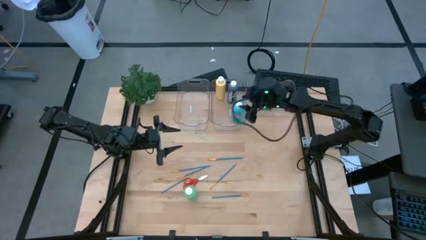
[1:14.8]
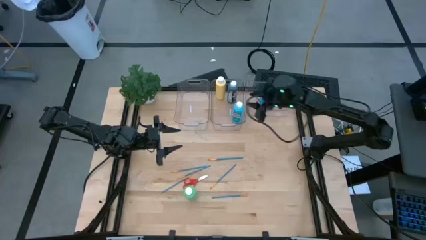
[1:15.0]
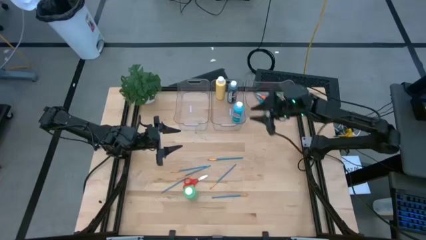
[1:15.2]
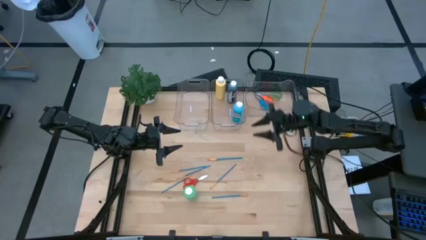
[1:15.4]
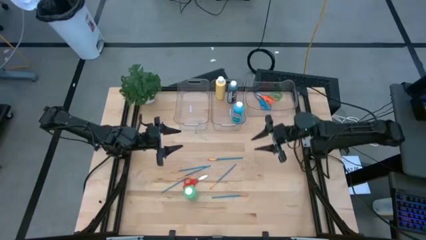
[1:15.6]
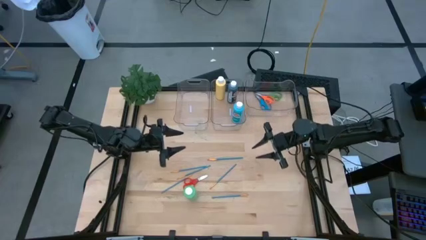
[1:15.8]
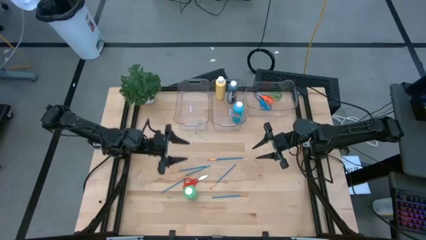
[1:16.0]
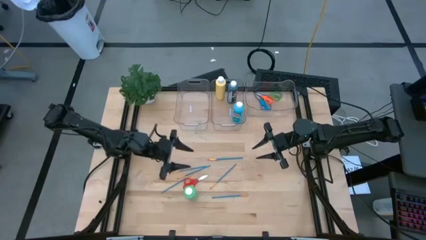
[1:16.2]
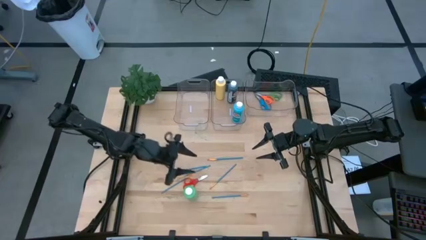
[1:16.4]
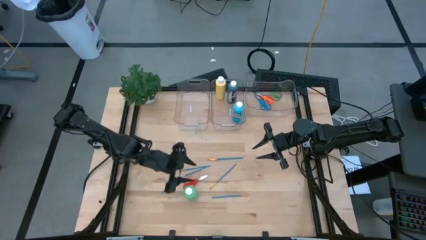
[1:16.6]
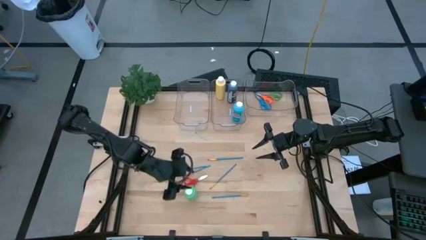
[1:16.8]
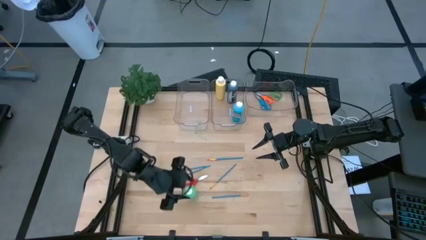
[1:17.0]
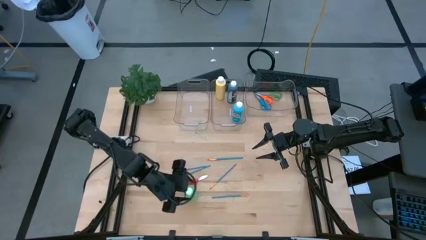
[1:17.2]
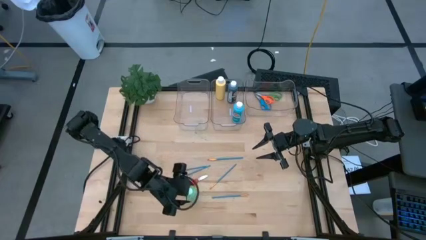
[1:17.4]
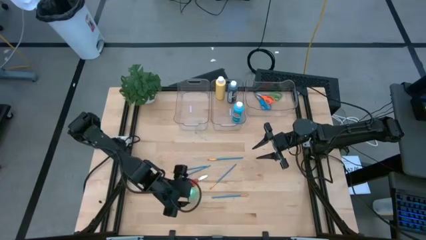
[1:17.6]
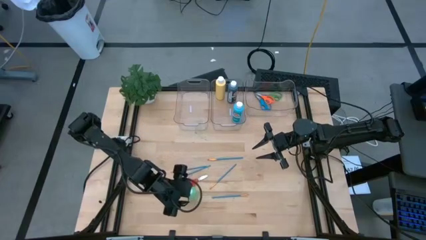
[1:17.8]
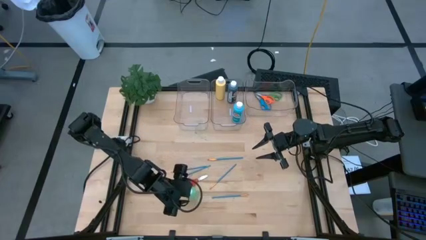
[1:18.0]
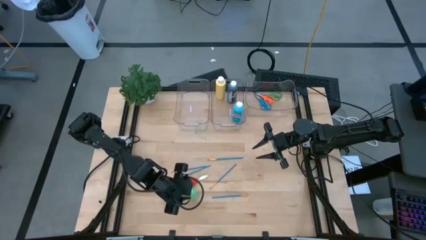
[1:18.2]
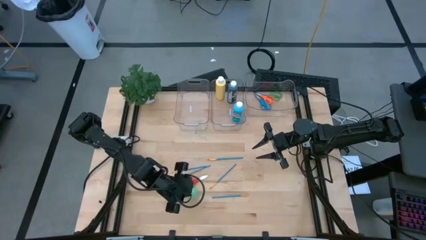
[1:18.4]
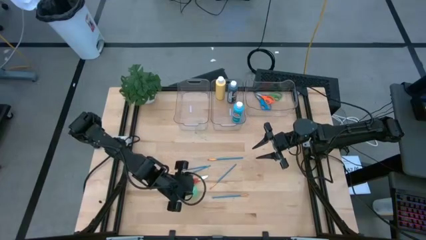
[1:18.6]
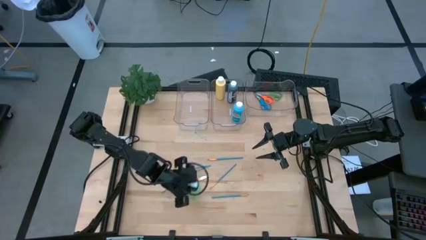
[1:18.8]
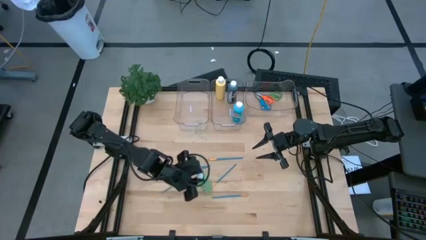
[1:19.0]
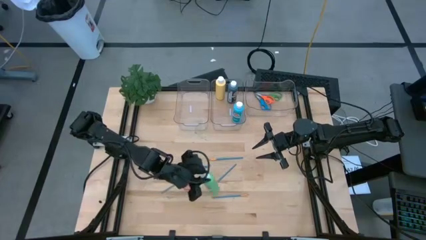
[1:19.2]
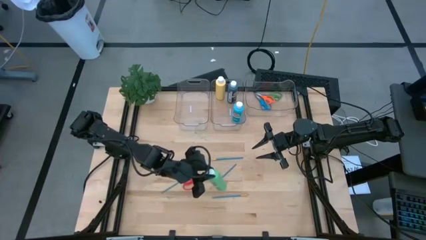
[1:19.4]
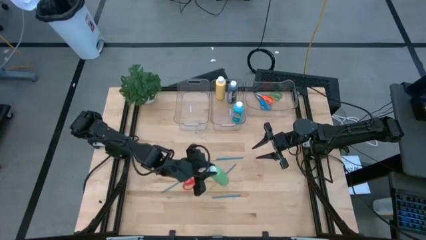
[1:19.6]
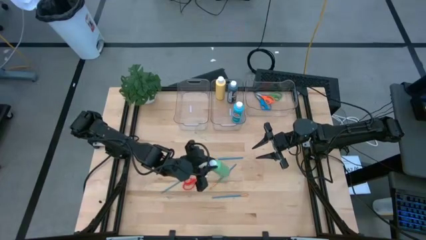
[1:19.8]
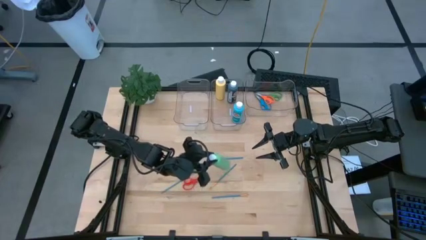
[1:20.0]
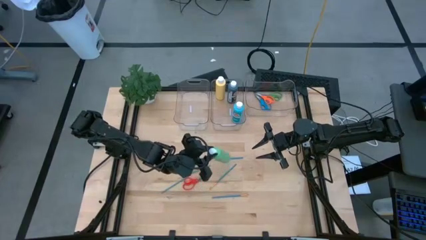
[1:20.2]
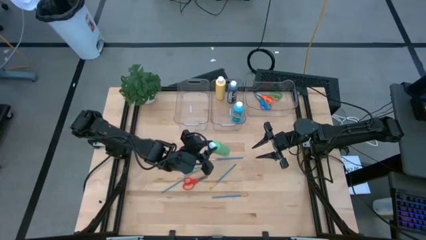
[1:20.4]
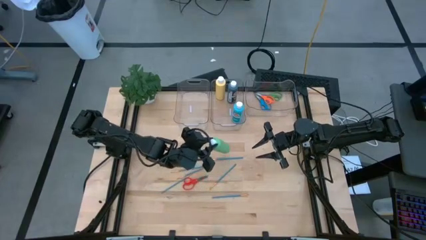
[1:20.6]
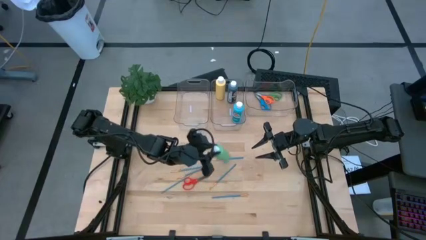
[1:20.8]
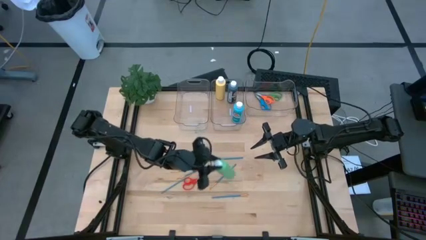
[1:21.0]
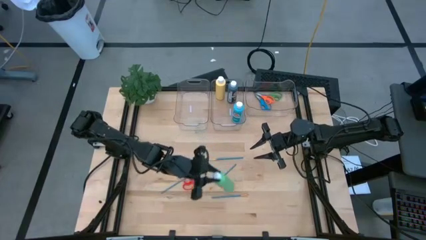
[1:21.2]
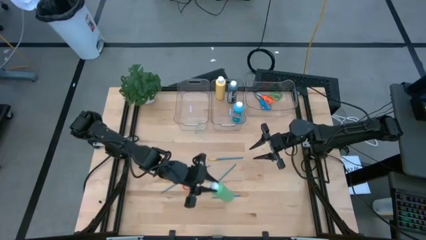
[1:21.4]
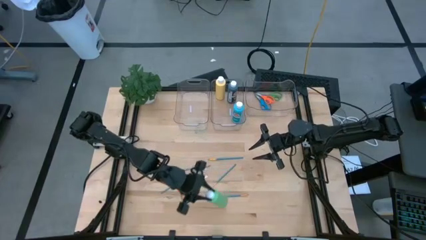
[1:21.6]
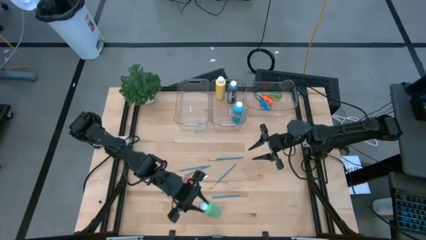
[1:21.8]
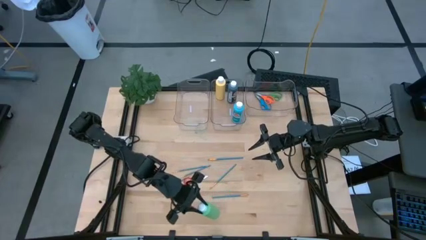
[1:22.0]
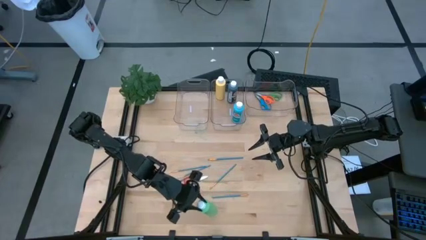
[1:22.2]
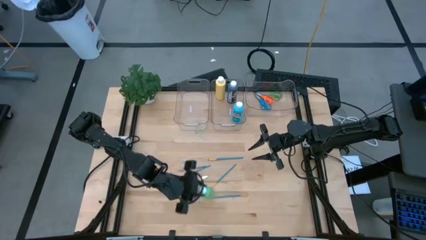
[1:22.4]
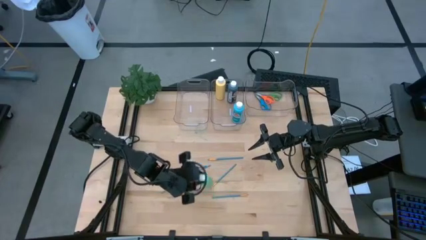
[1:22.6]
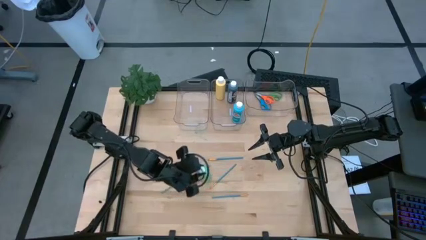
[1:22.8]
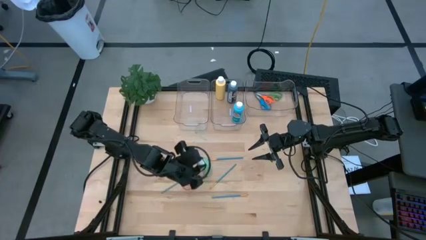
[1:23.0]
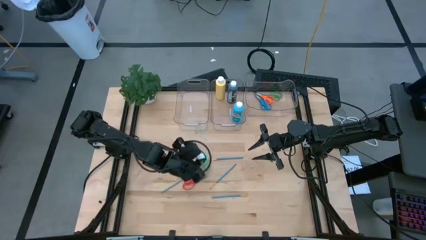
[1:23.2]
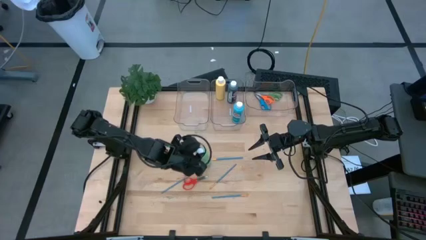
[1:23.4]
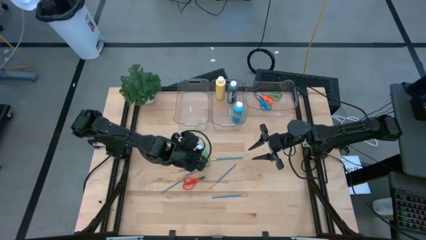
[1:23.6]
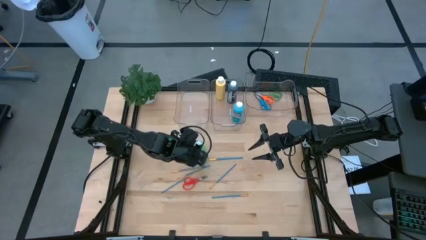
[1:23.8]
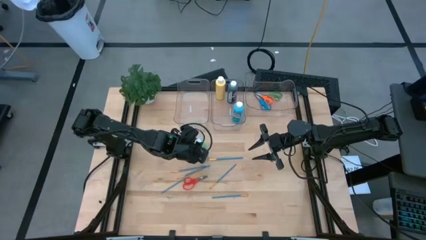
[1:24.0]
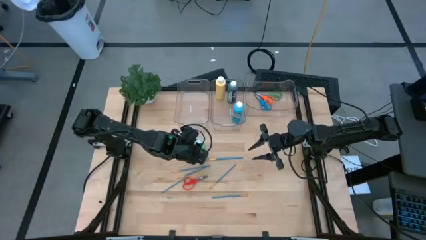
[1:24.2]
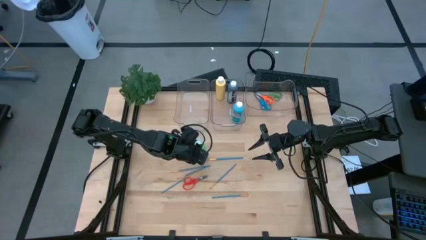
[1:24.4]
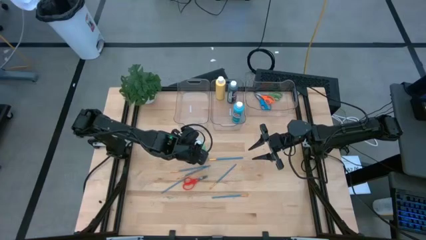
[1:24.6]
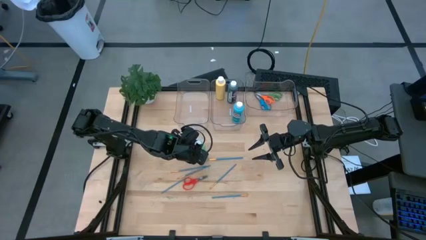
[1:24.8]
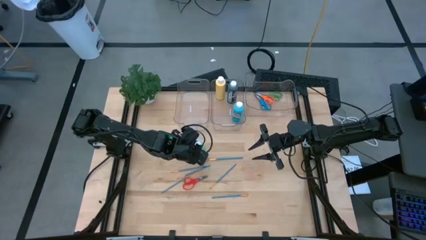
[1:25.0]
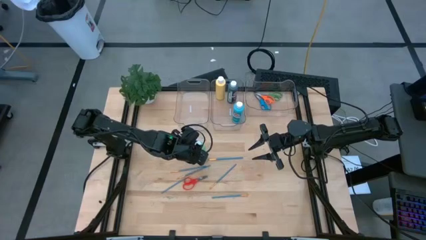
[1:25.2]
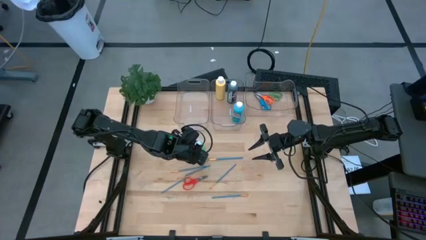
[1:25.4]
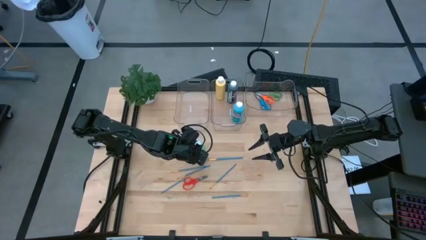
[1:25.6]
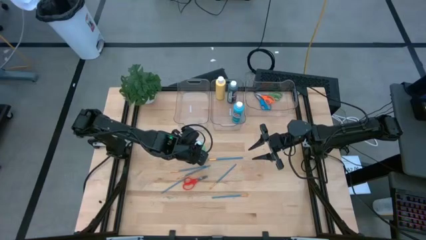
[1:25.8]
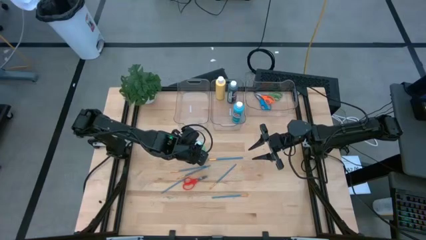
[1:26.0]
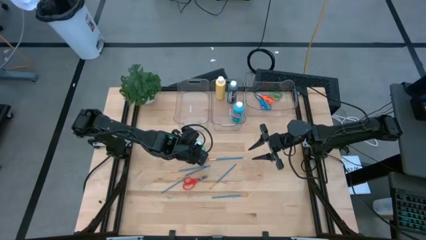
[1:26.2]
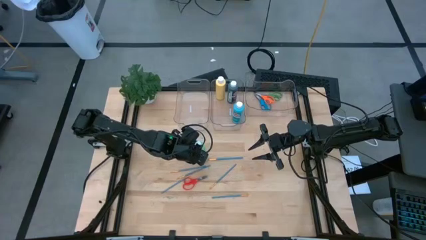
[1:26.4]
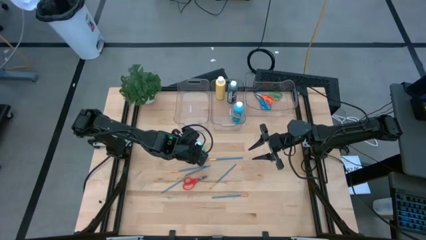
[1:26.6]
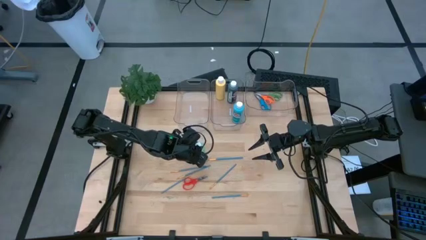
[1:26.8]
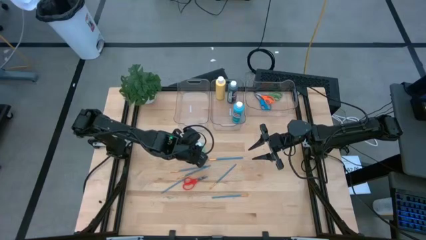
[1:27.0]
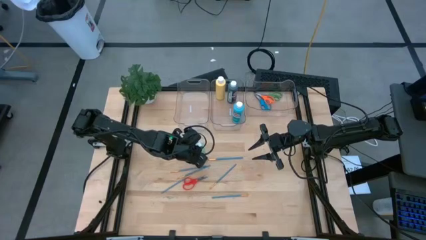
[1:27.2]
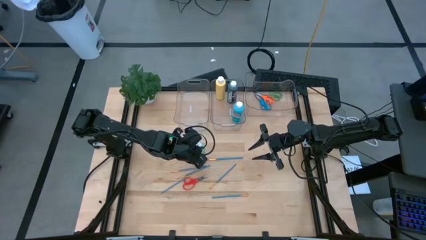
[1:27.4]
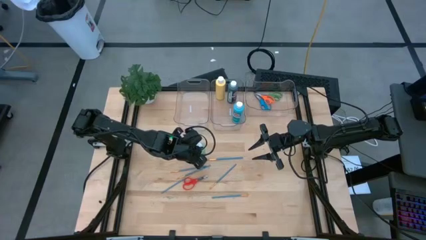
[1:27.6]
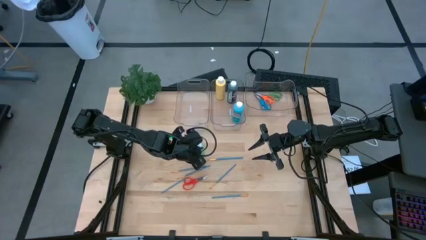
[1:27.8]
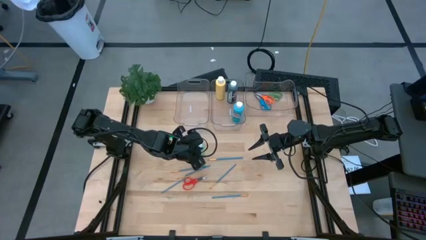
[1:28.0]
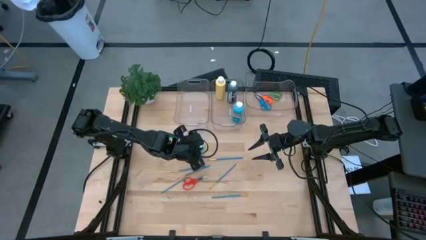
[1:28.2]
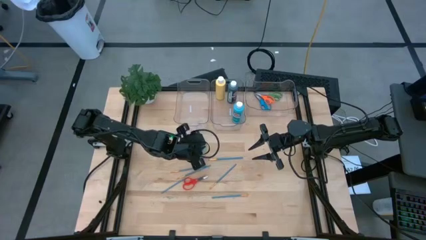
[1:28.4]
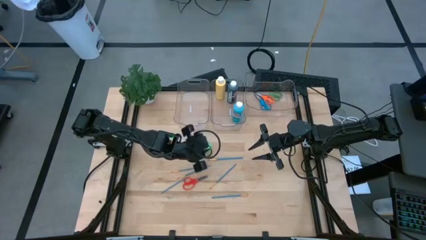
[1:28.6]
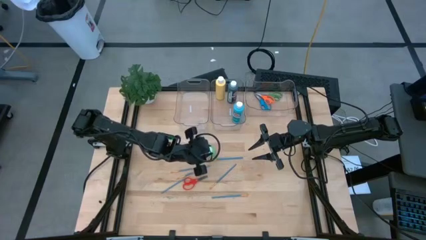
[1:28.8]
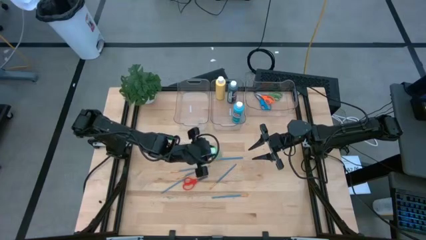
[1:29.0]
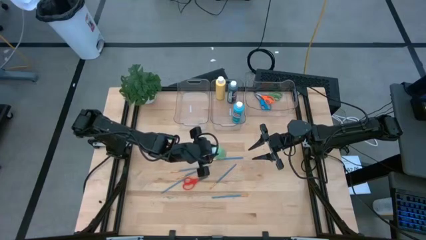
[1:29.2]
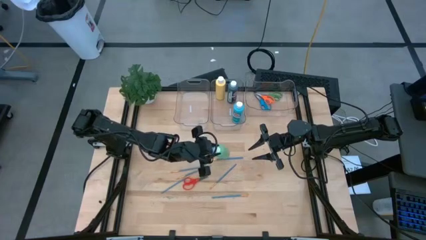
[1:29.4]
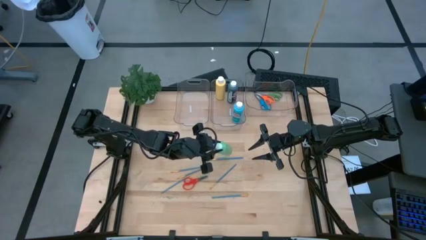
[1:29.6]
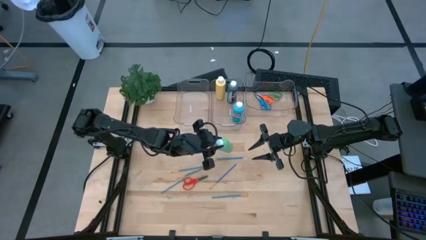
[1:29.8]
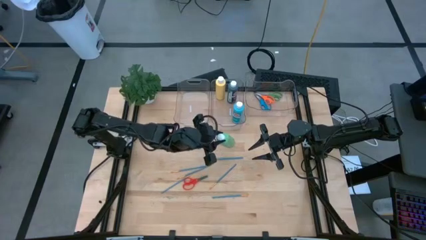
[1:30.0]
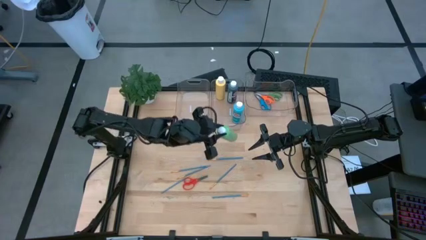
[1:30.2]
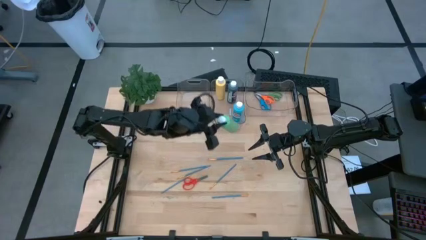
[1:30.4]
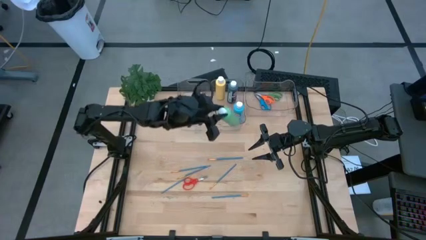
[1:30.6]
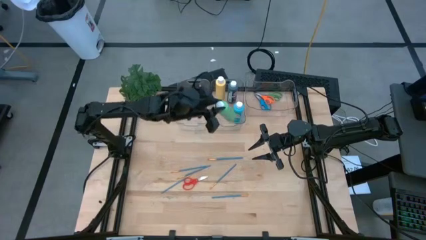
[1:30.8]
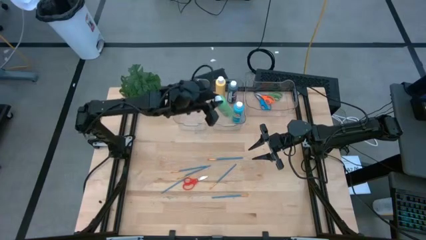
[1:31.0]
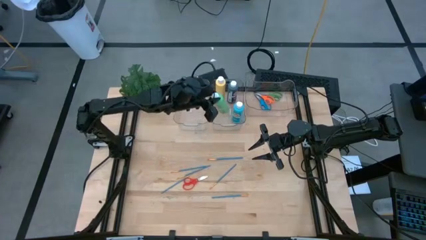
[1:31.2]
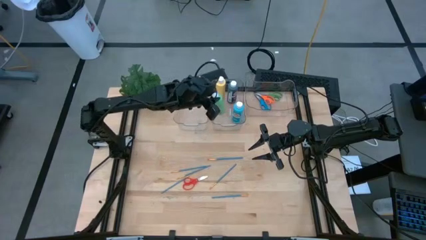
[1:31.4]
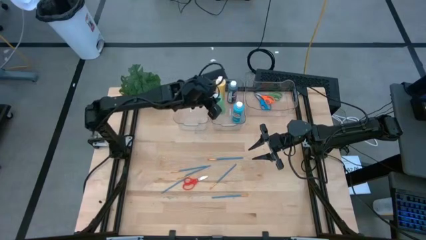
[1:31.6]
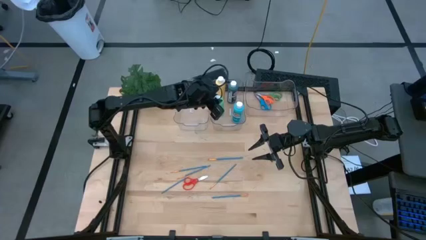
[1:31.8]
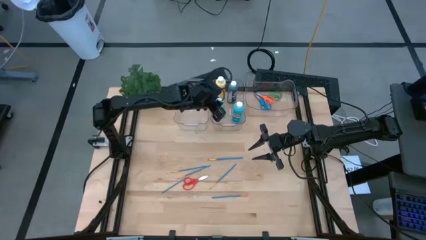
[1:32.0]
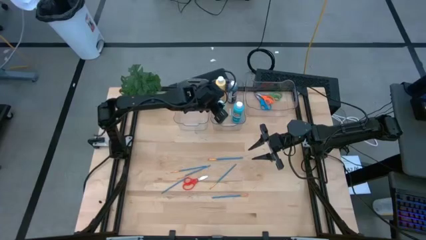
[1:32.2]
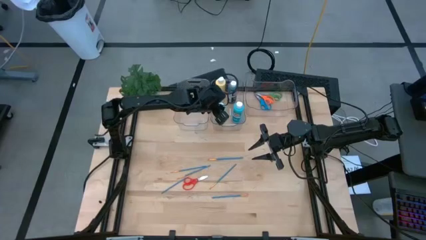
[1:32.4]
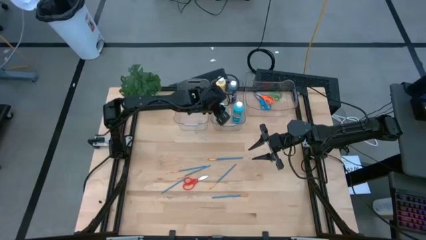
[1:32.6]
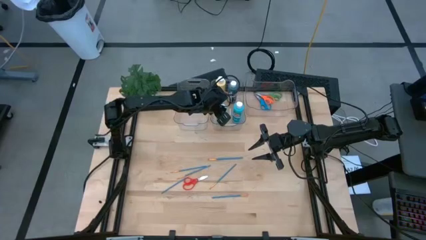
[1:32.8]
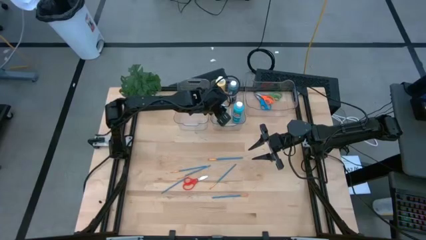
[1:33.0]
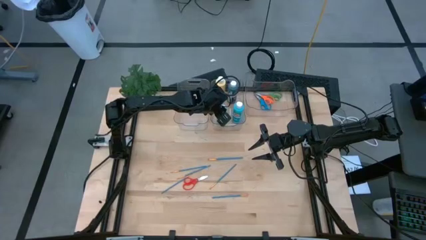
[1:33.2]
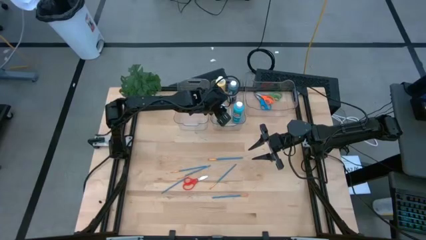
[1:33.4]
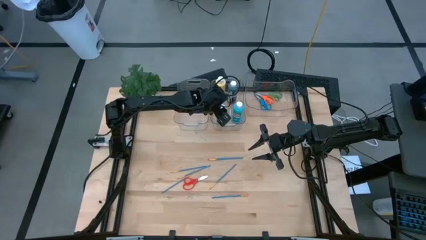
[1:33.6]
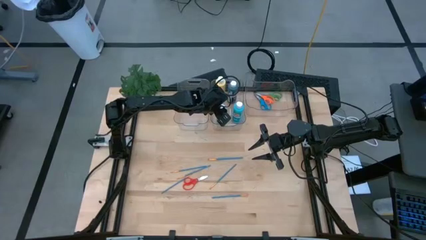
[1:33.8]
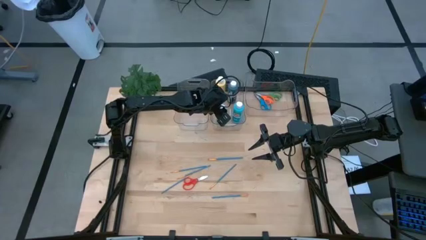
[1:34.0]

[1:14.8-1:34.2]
Task: Pick & Place Paint Supplies
Put the green paint bottle into the middle transparent bin
